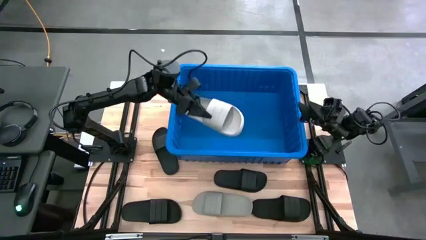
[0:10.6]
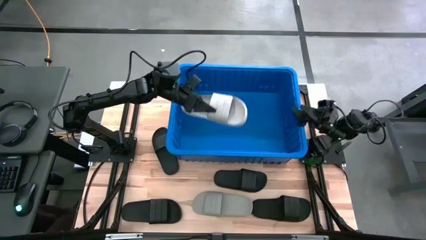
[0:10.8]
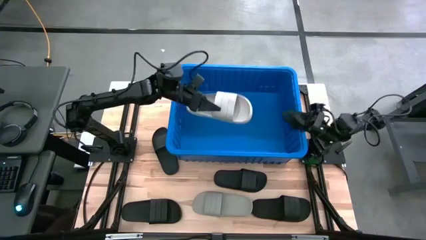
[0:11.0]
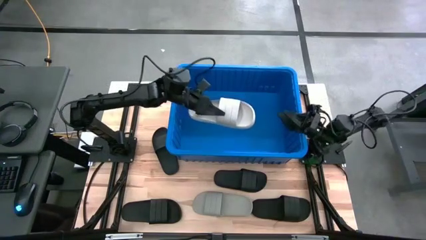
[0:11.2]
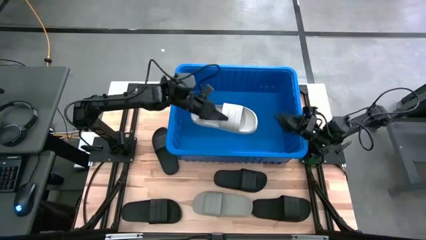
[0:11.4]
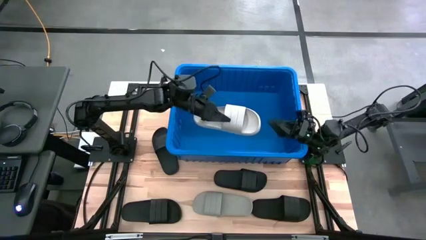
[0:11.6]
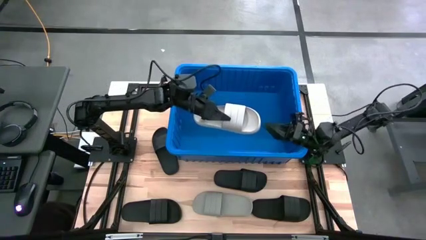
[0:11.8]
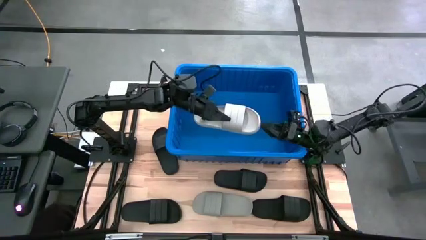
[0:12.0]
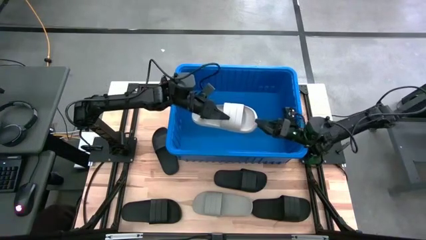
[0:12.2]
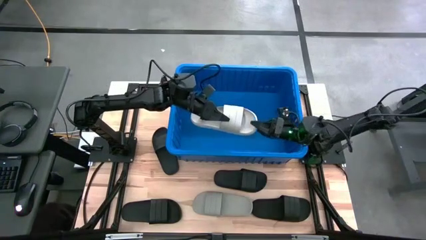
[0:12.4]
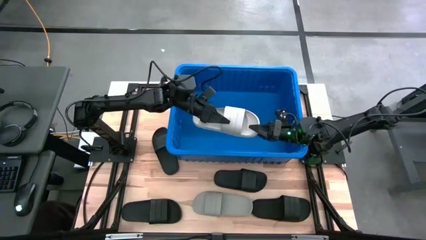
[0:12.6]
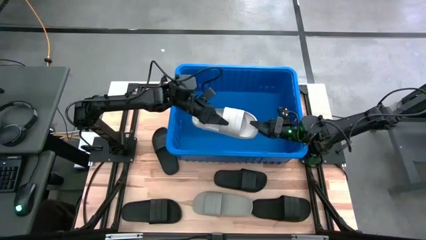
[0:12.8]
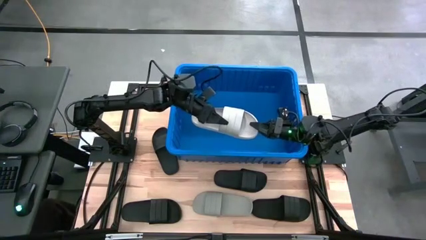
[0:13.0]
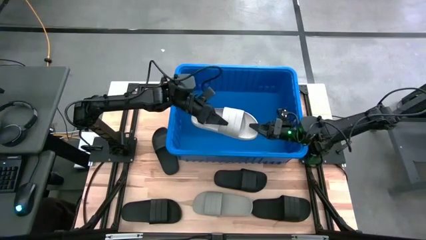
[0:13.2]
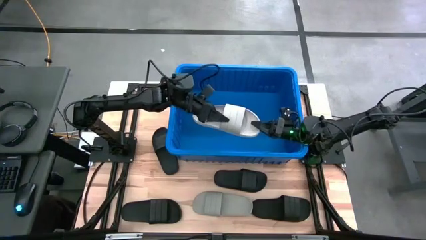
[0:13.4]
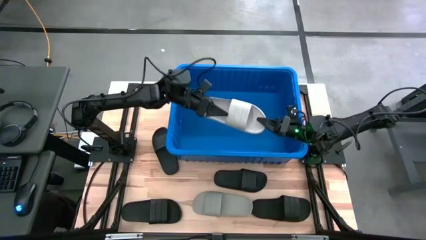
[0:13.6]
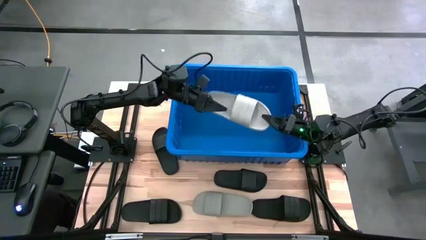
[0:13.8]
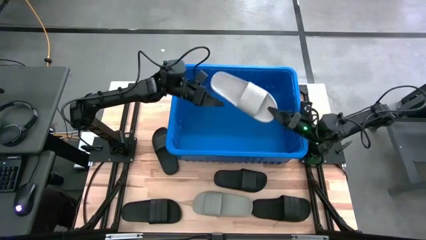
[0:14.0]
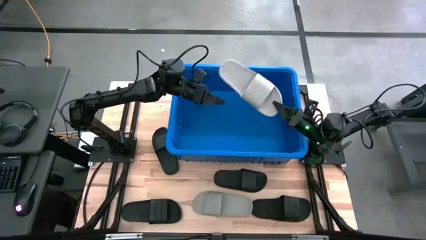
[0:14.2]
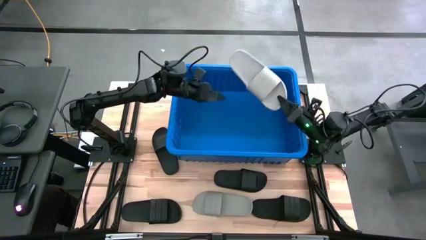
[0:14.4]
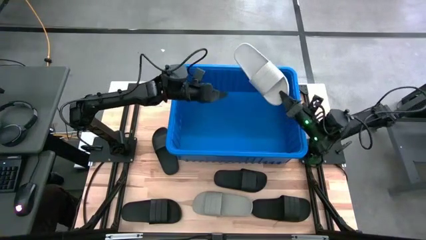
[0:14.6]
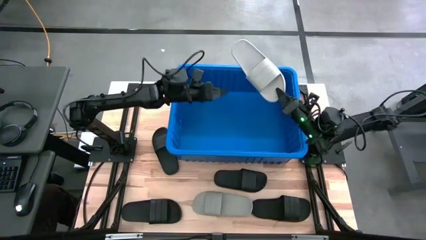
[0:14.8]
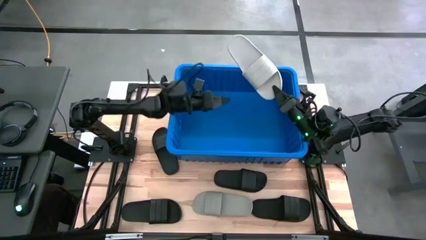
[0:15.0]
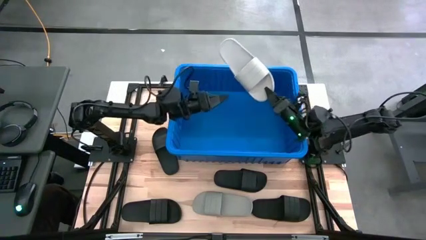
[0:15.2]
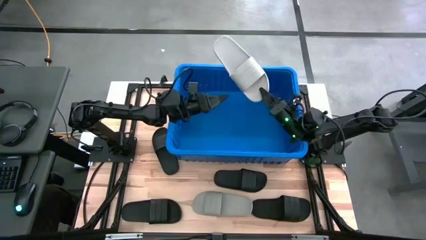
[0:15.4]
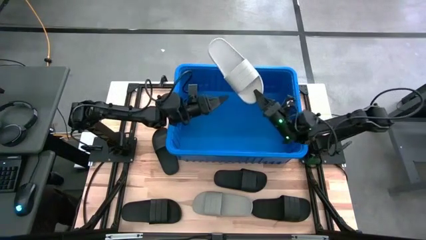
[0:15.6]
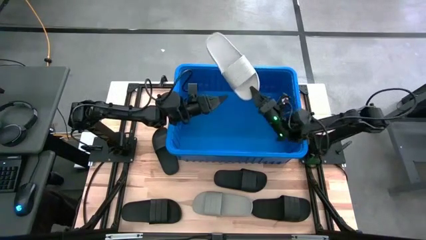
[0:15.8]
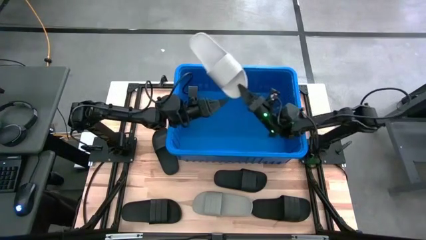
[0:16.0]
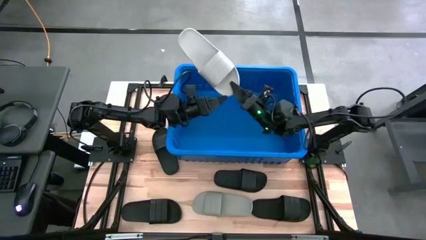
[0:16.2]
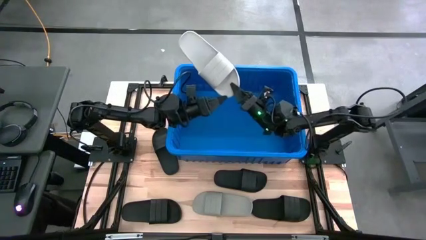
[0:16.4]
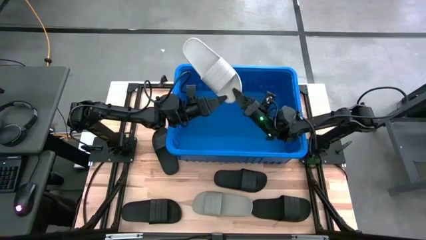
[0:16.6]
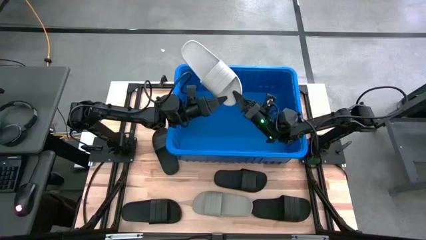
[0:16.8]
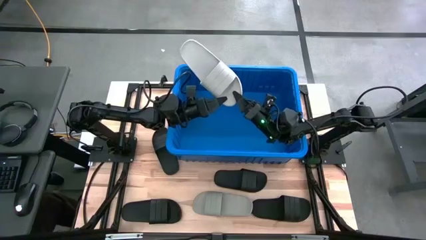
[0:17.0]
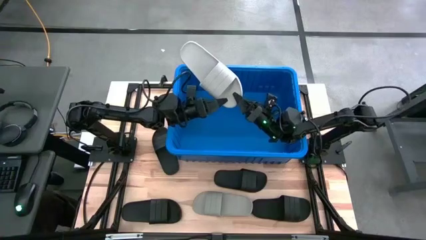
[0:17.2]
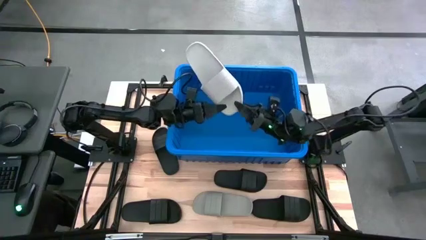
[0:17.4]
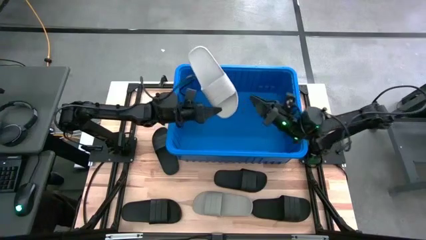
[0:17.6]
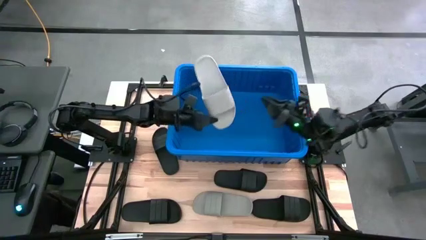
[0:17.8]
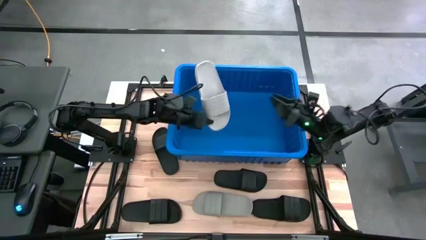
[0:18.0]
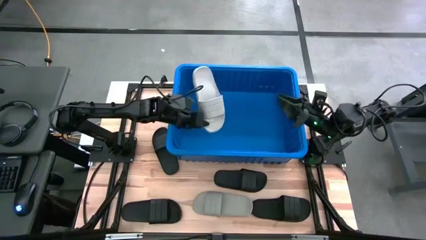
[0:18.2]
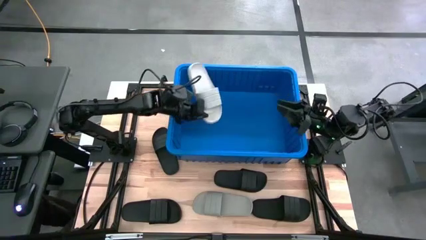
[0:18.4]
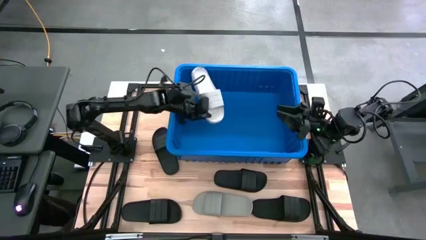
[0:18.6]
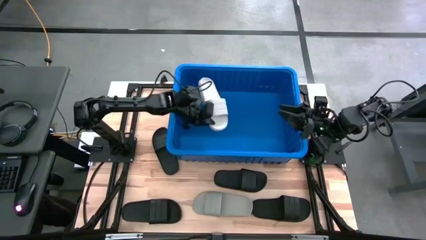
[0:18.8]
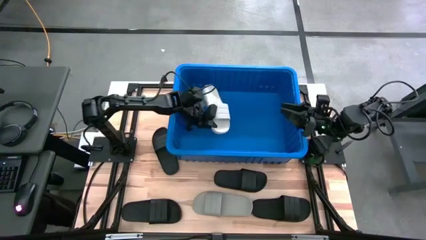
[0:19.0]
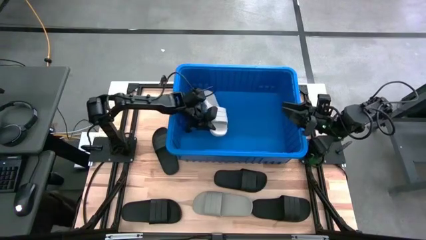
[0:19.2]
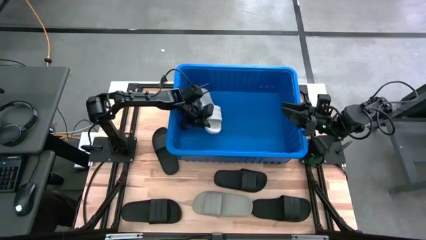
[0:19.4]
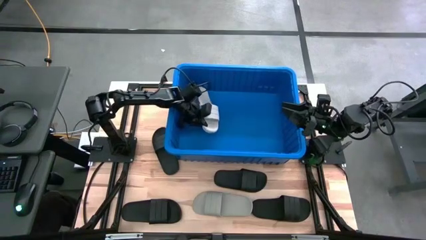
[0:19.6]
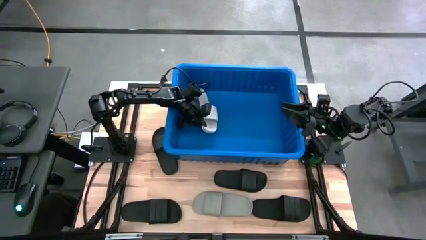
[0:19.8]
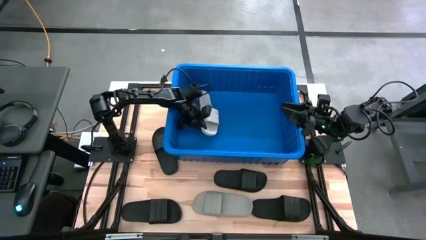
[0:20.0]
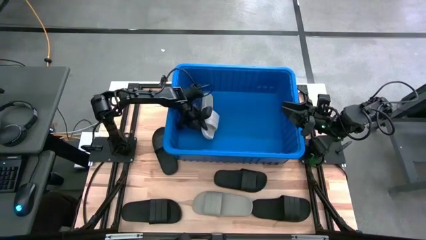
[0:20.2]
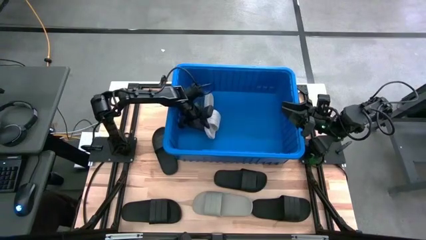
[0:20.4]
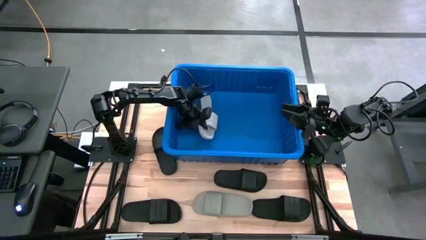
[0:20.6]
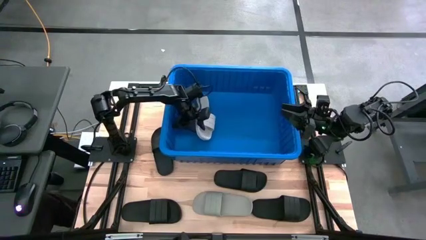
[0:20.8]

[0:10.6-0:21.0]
Task: Pick and place slides into bin
Put the gray slide into the blue bin

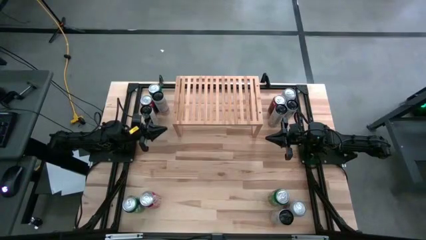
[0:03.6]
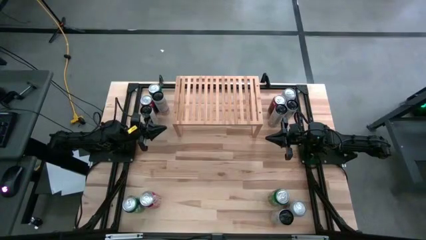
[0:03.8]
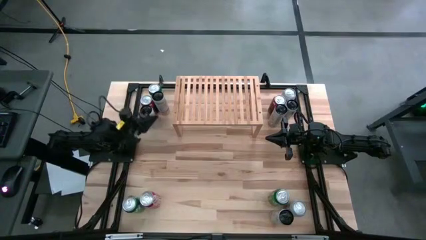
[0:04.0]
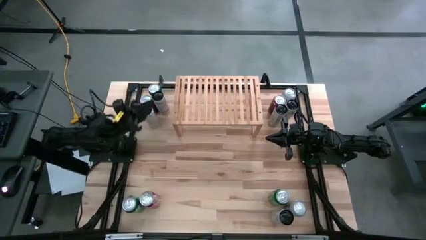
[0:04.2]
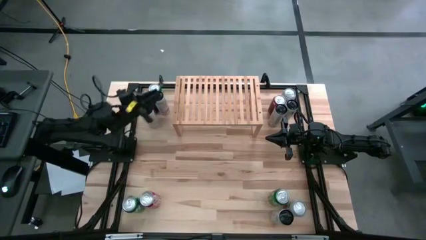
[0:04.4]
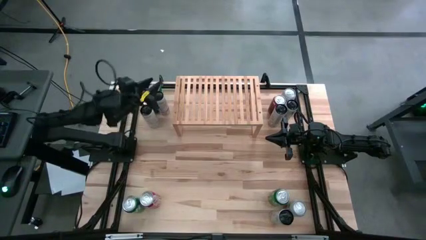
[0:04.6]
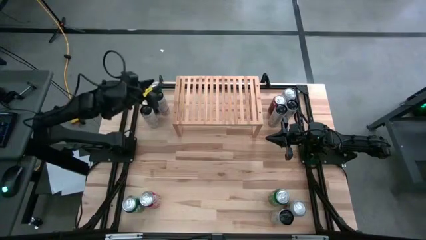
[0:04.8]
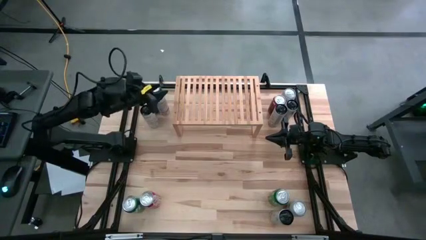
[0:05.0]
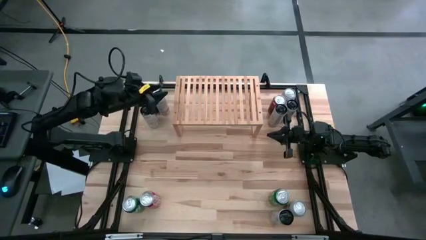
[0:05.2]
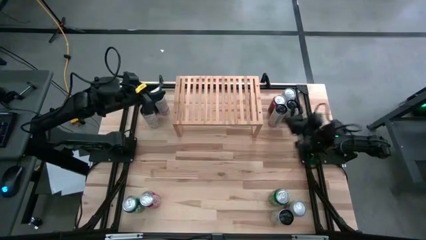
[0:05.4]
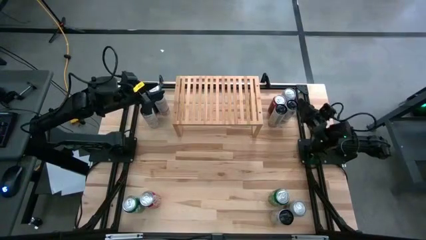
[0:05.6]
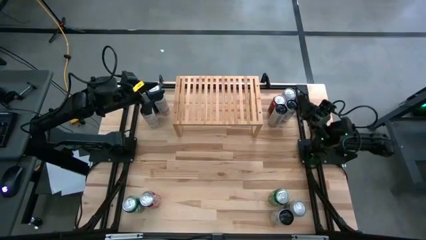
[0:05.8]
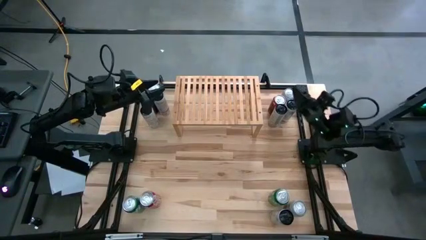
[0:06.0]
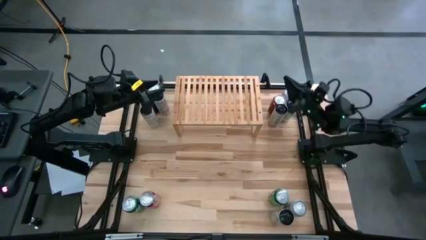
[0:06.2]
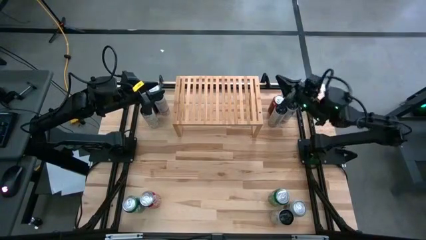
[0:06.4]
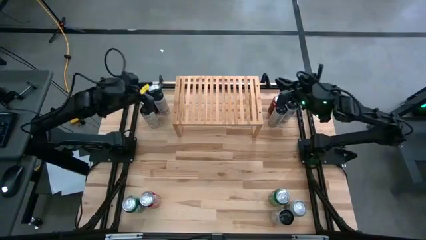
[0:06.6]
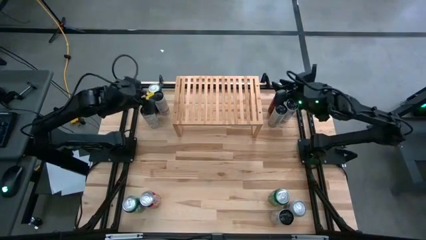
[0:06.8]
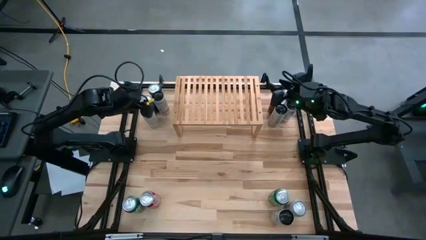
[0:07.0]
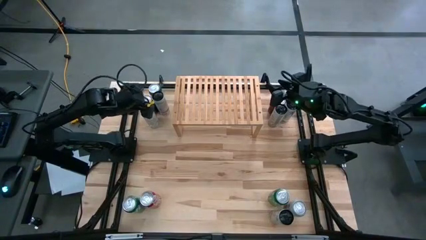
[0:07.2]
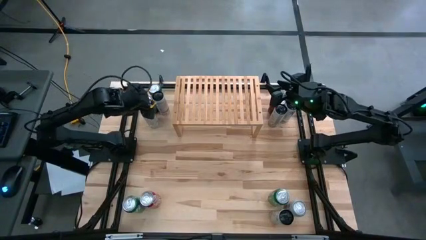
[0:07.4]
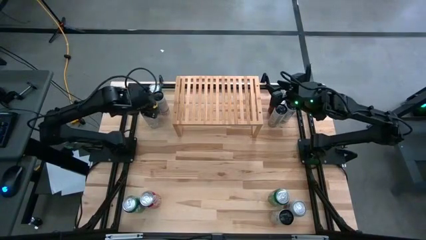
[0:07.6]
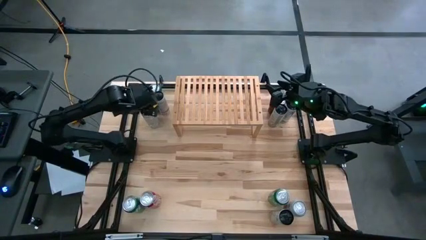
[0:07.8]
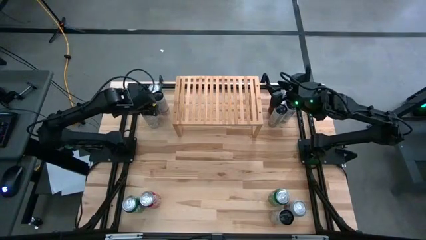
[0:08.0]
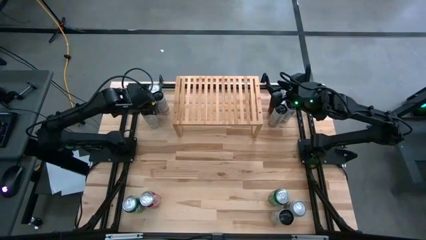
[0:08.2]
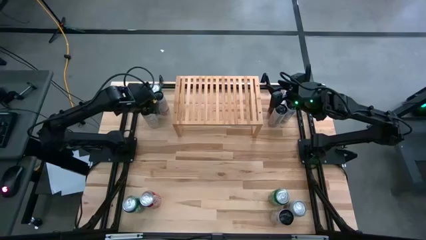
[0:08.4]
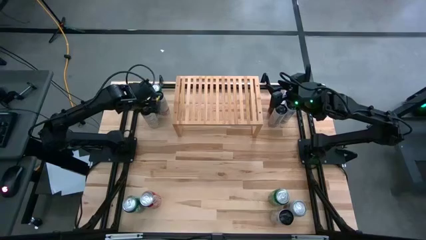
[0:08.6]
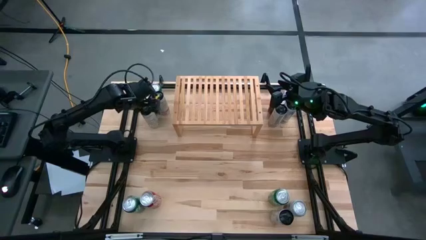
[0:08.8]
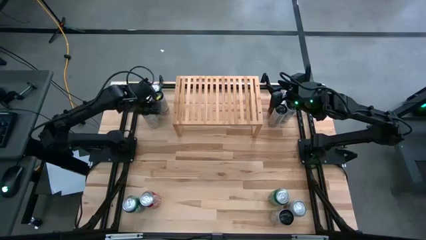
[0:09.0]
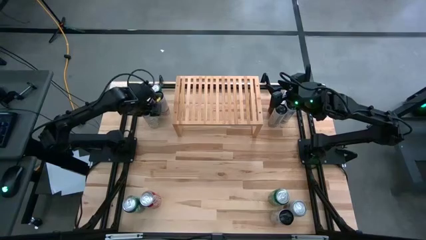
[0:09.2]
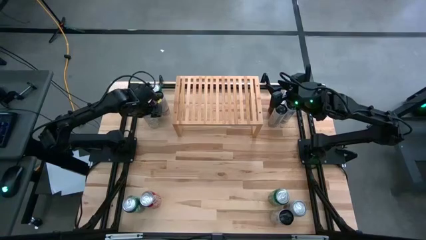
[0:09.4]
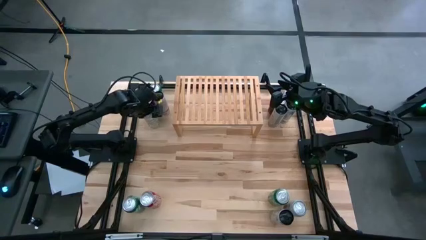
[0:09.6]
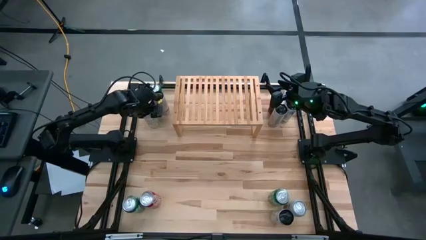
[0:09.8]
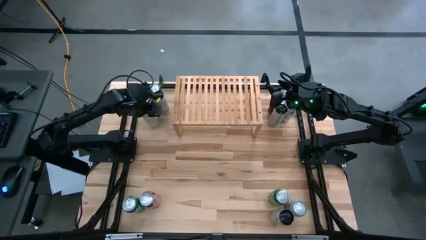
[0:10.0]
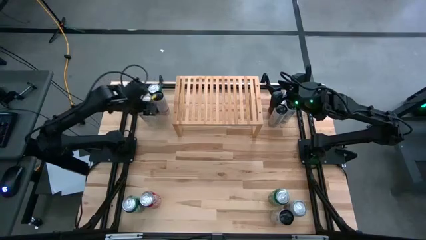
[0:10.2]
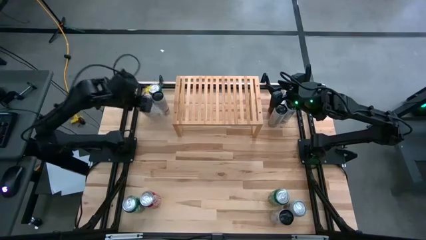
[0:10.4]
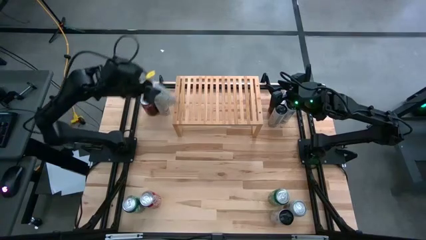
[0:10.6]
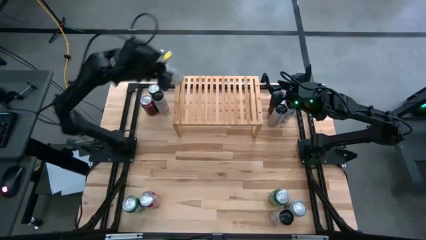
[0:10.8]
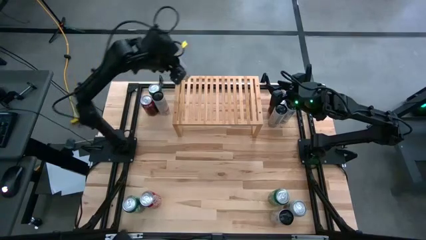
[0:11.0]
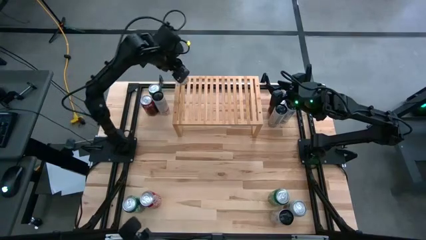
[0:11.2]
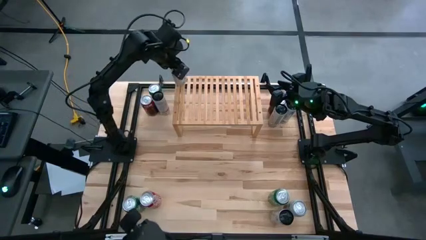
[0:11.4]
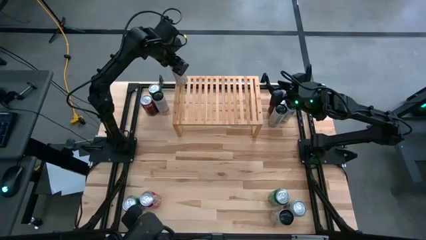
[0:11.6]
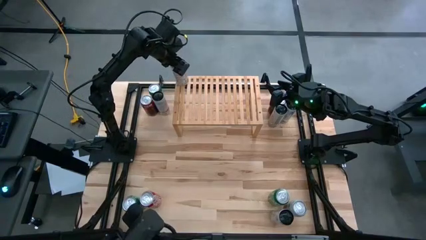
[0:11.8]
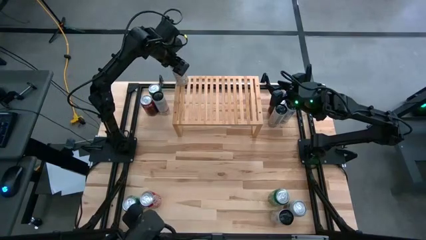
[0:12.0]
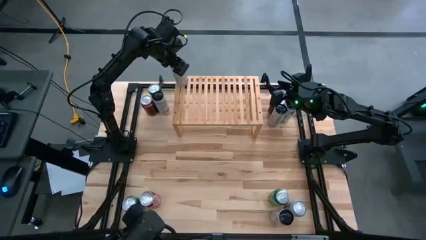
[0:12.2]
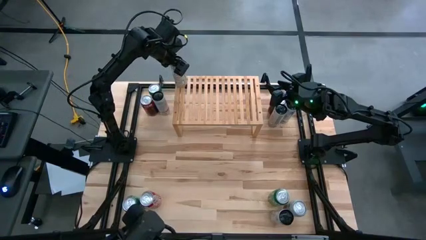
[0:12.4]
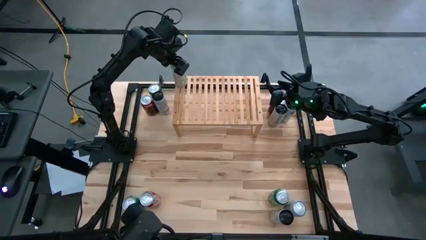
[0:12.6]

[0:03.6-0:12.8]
Task: Place canned beverage on shelf
Put the left white yellow soda can on the shelf
